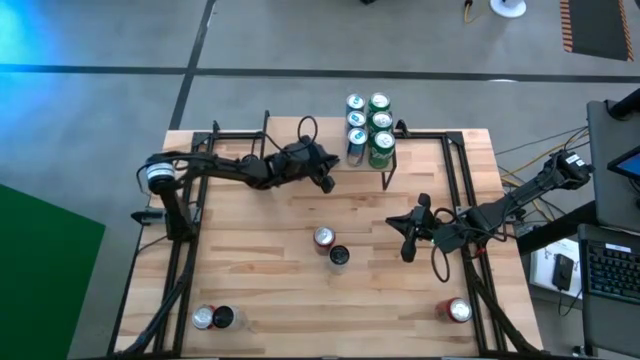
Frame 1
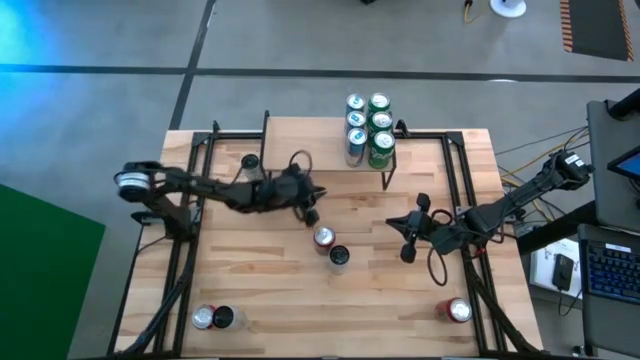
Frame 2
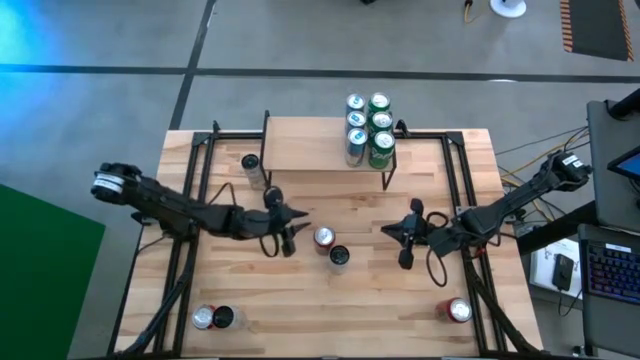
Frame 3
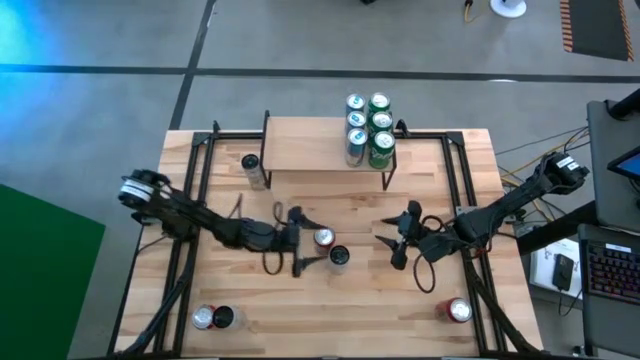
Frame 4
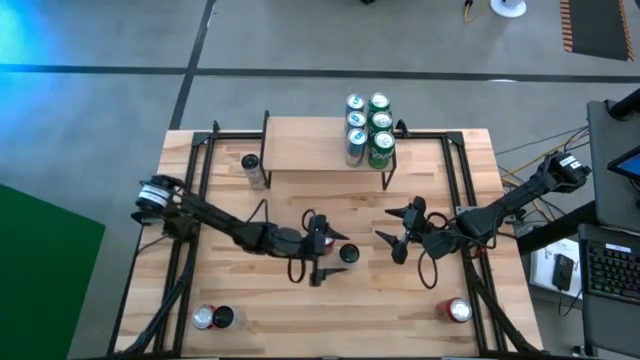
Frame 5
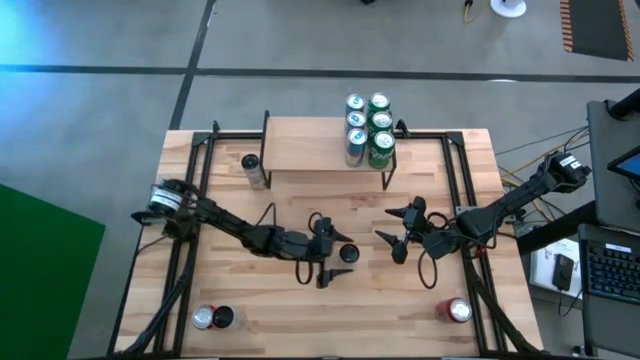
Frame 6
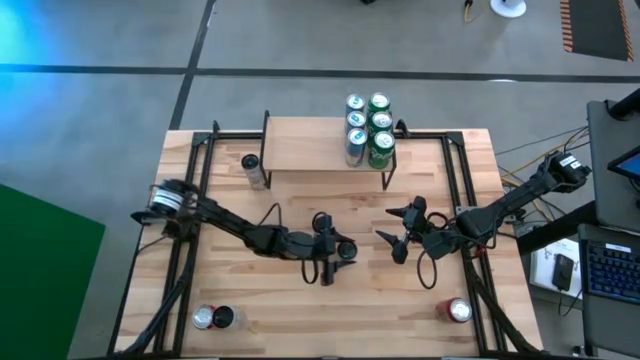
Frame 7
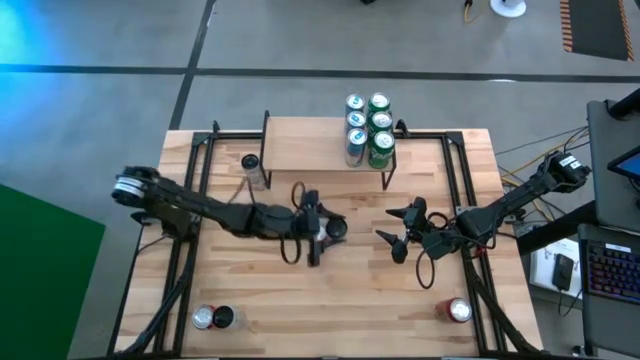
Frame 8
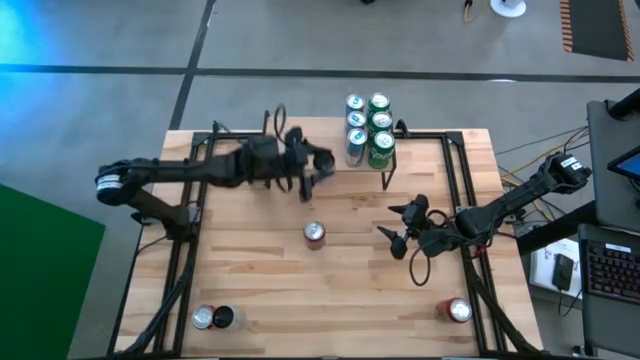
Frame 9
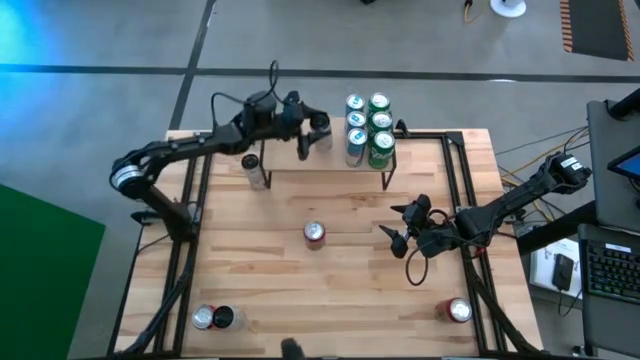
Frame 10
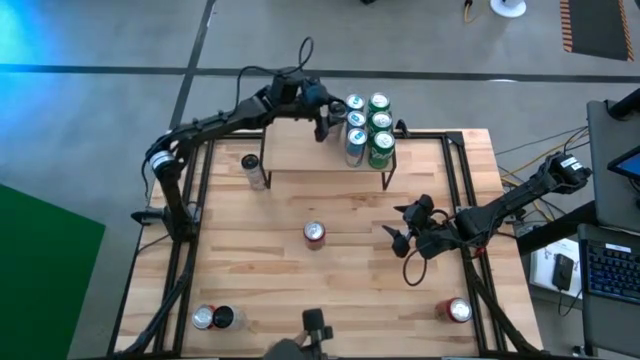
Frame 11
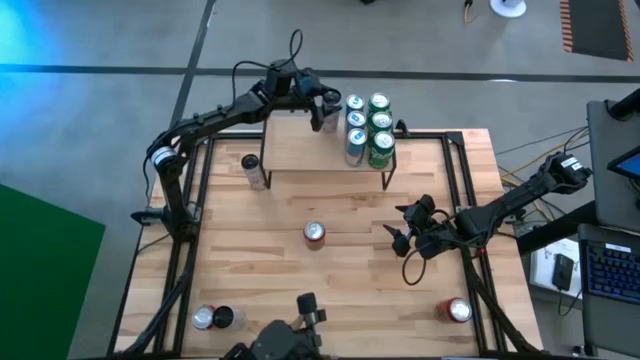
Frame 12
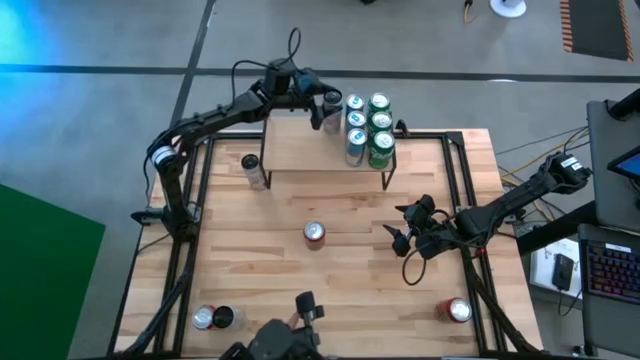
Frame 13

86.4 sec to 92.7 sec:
Task: Place canned beverage on shelf
Put the middle white pink soda can on the shelf

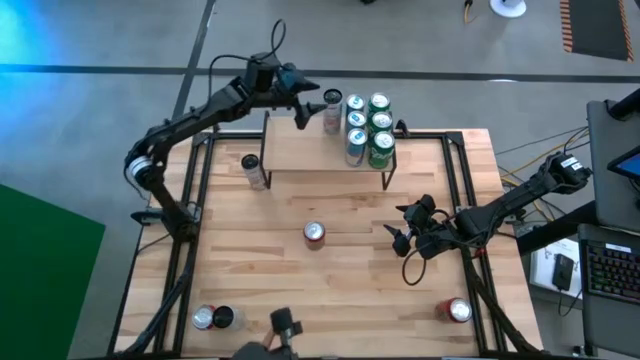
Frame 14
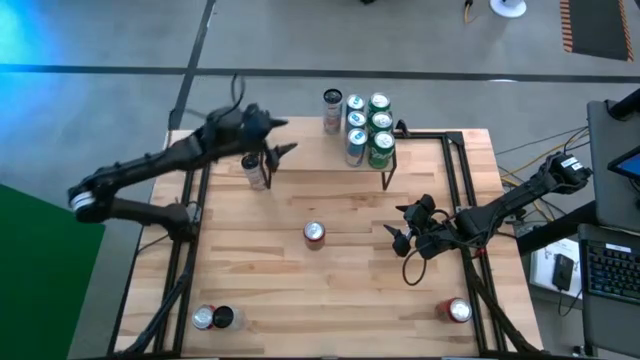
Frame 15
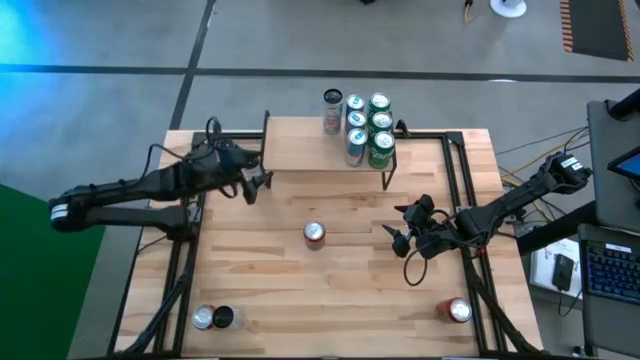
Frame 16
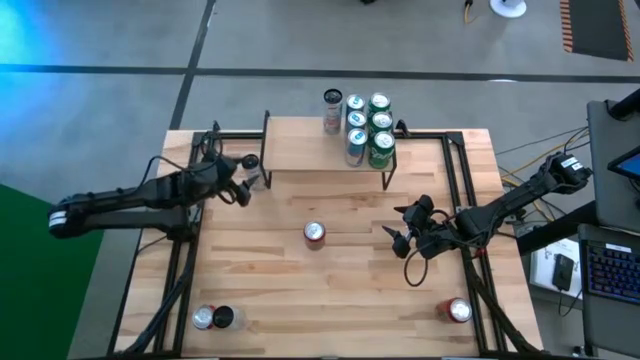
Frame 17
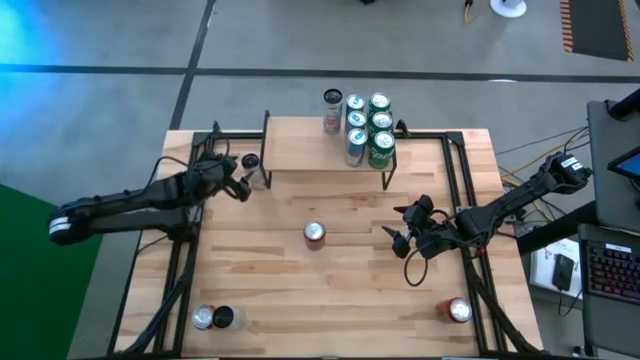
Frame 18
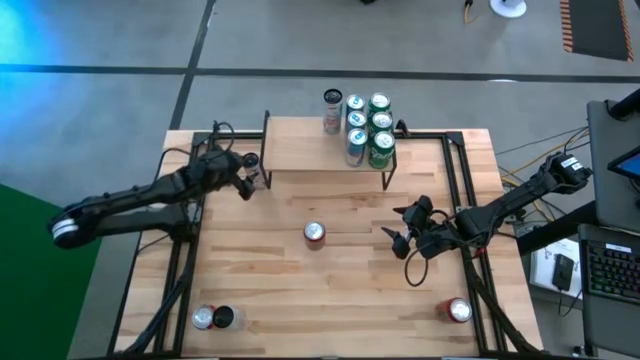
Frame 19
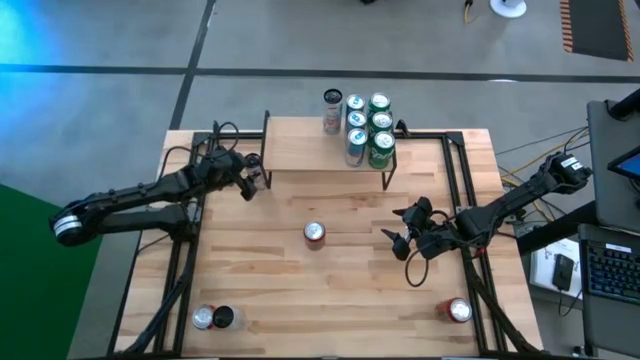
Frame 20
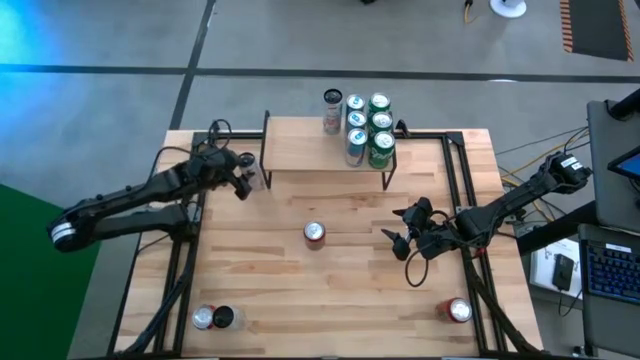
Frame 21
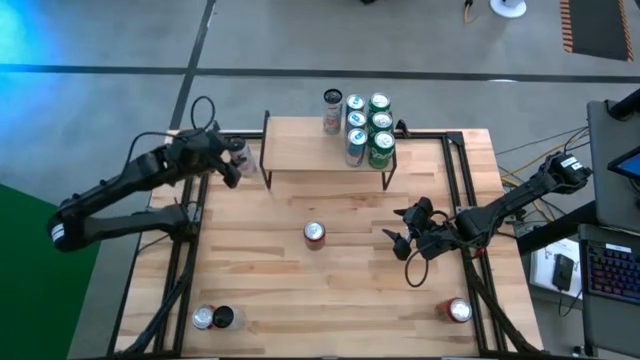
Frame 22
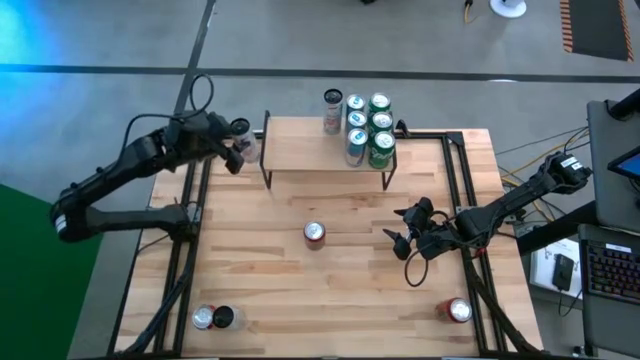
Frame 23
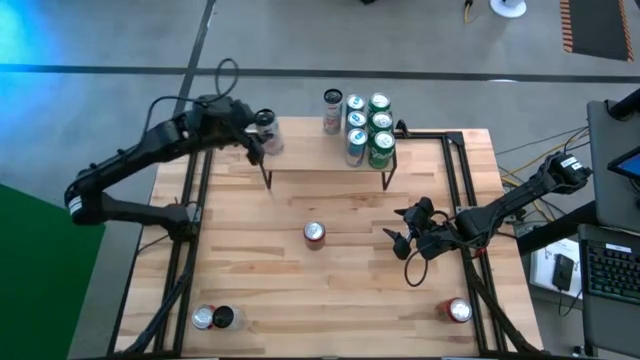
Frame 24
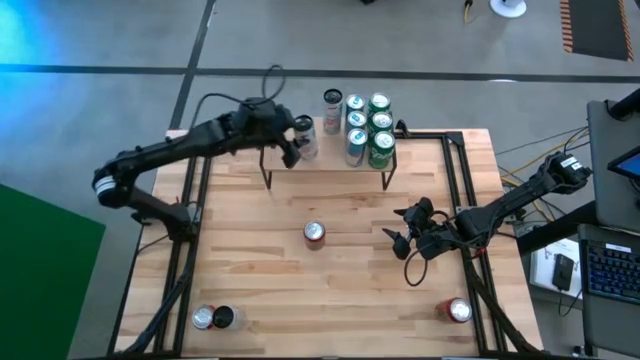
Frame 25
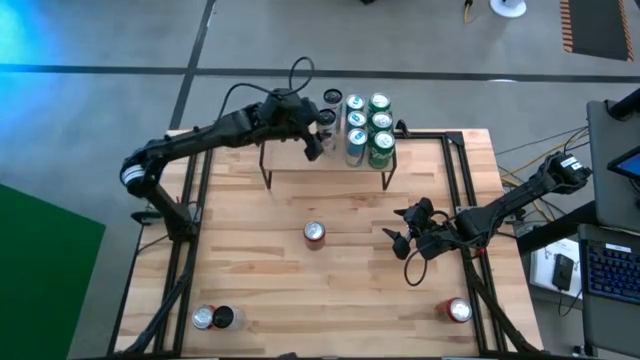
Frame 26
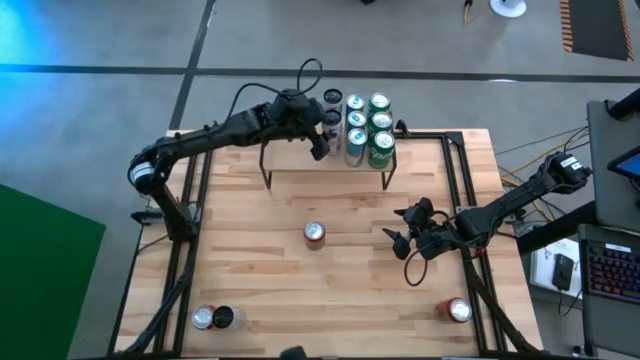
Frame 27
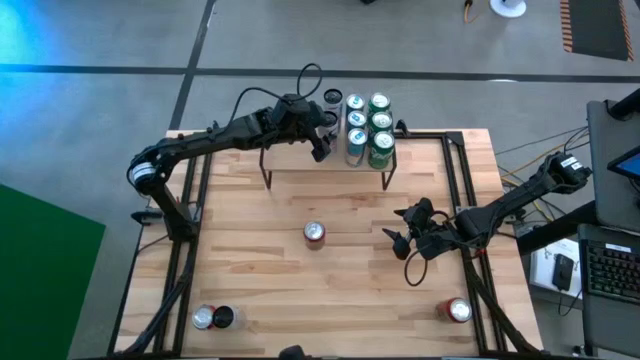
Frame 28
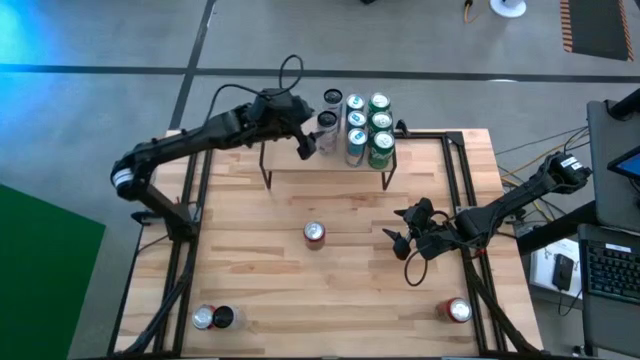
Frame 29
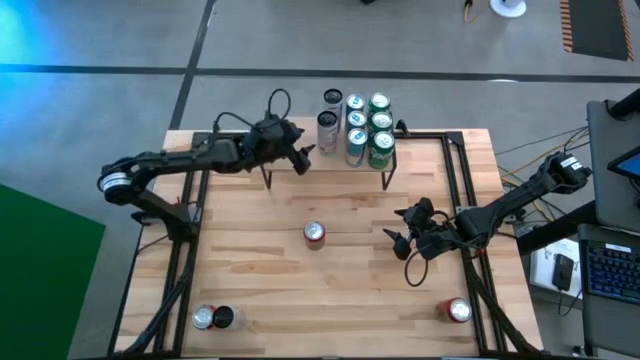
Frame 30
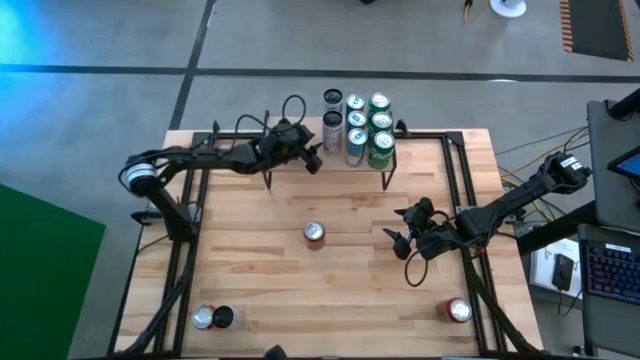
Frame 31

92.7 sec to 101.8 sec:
Put the top white pink soda can on the shelf aligned with the other white pink soda can

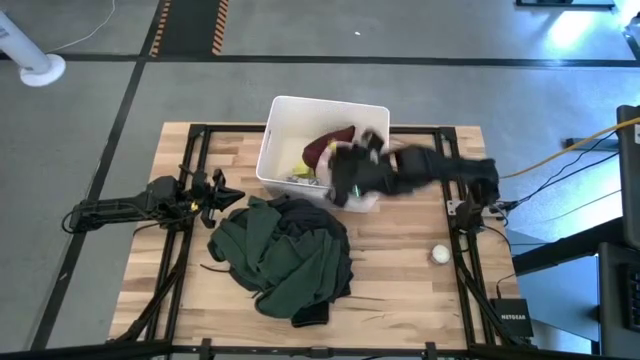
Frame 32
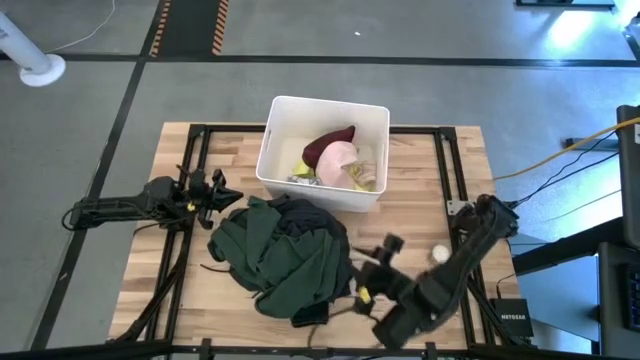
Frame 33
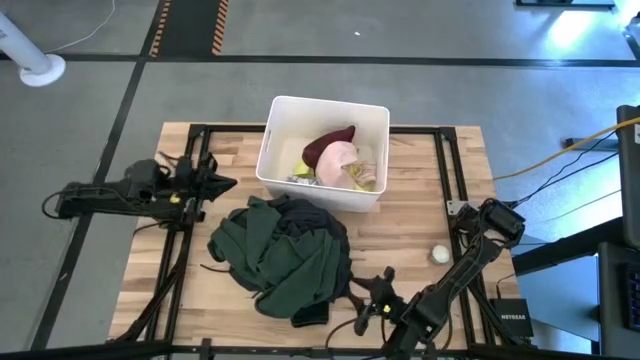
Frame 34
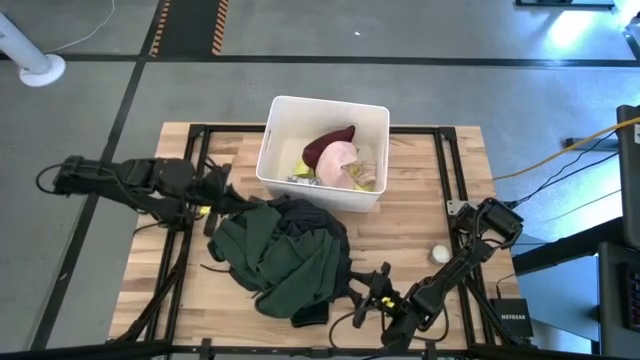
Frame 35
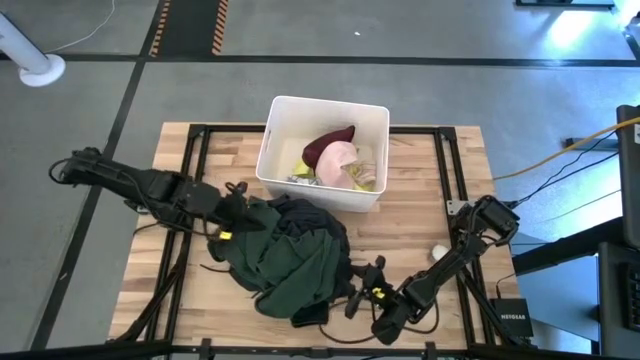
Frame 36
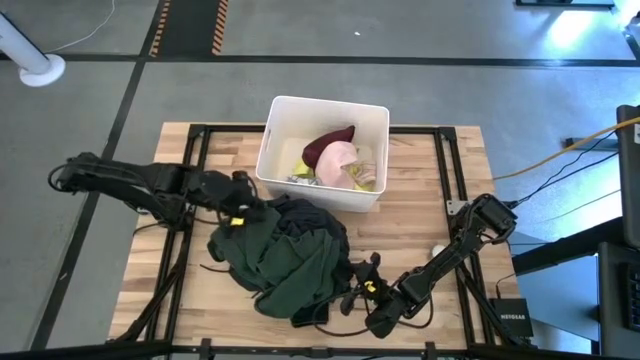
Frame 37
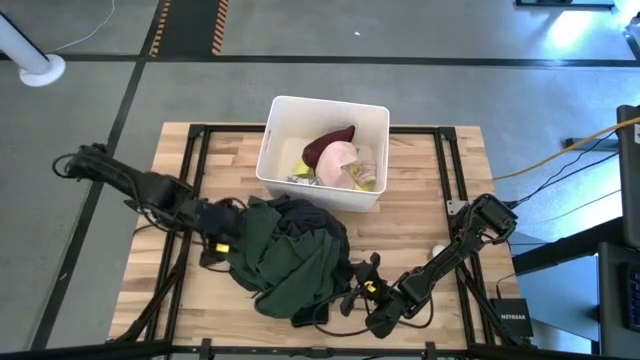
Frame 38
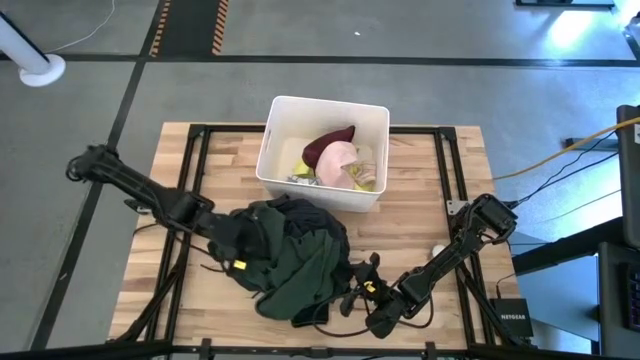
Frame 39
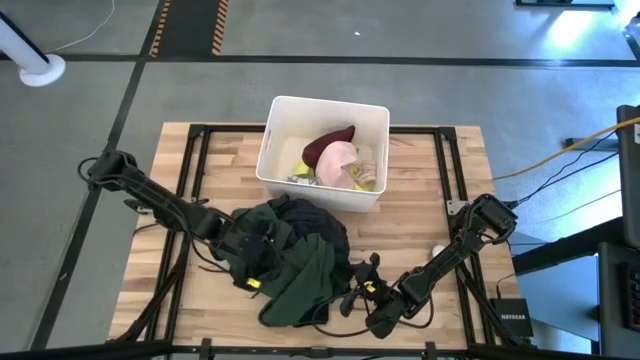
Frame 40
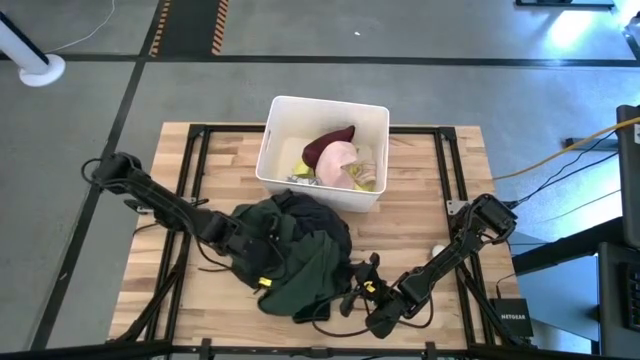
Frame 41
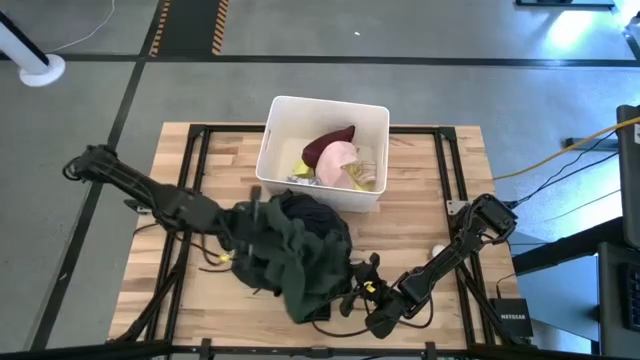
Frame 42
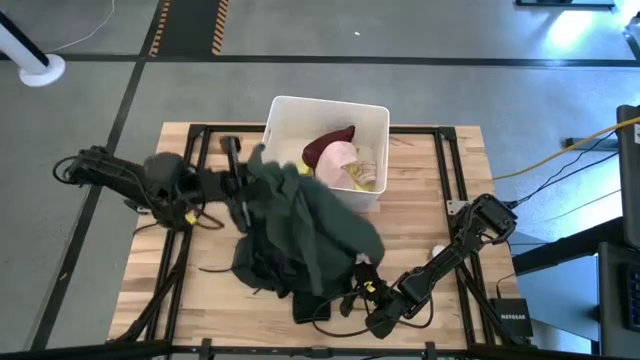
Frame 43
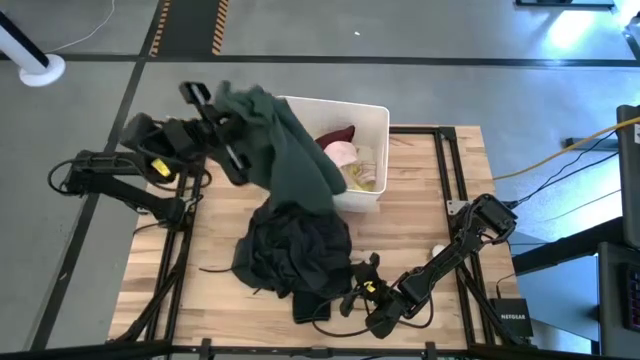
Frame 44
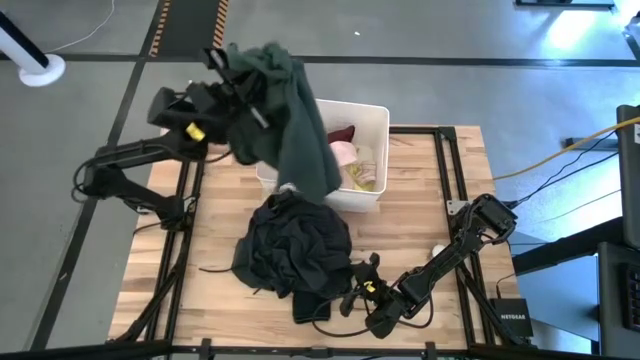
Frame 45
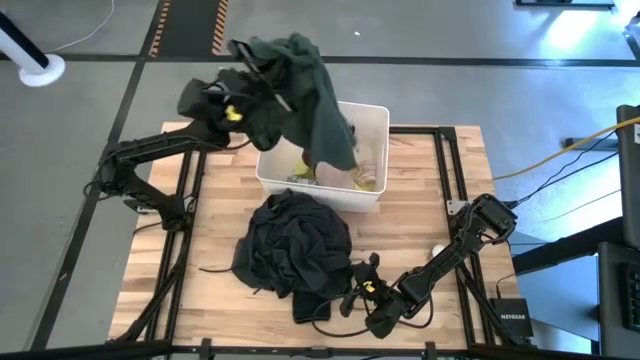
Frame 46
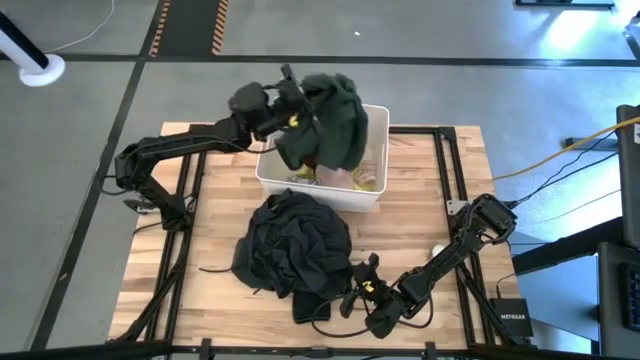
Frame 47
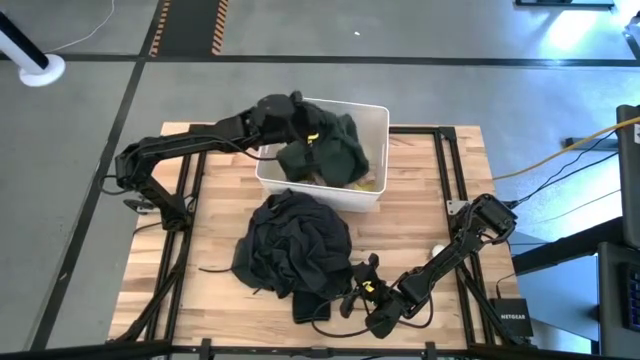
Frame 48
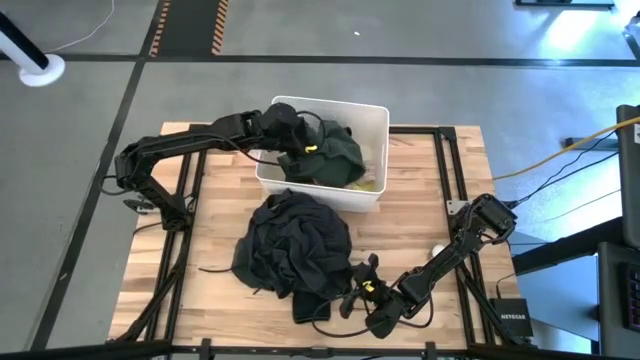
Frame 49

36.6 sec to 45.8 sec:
Task: Sort clothes
Put the green shirt into the white bin
